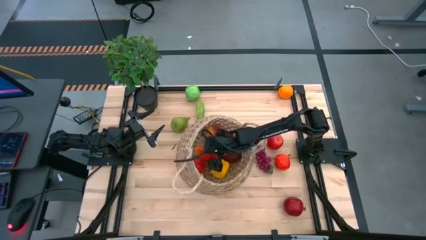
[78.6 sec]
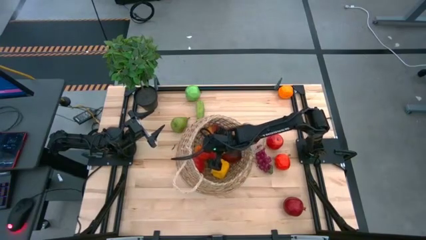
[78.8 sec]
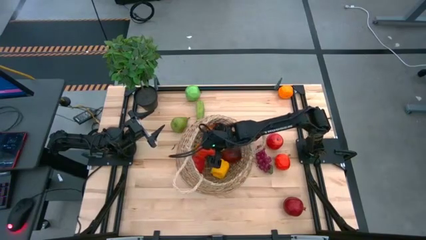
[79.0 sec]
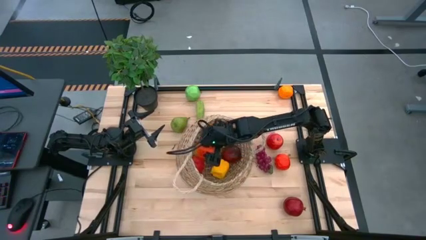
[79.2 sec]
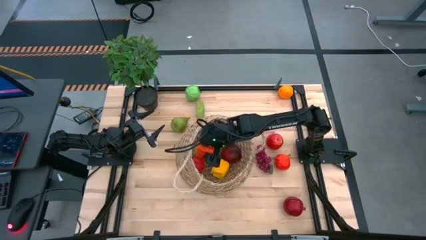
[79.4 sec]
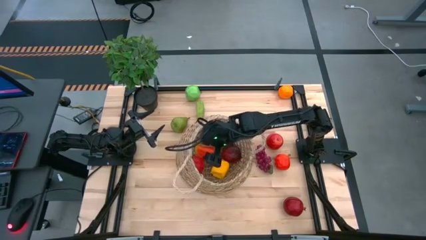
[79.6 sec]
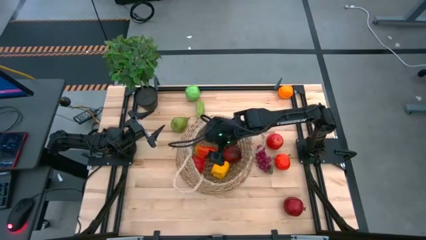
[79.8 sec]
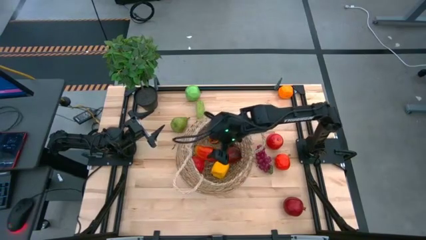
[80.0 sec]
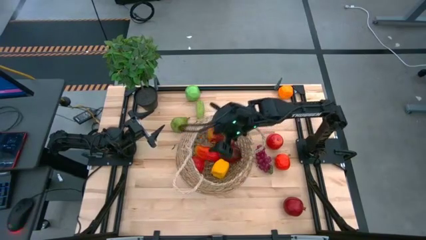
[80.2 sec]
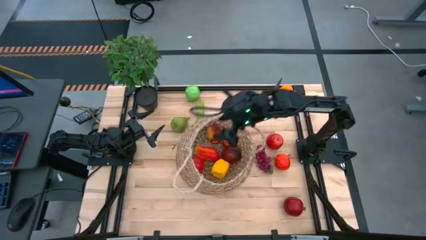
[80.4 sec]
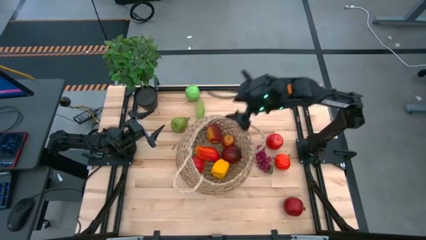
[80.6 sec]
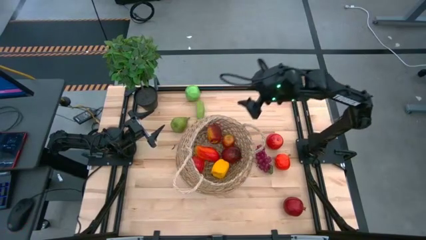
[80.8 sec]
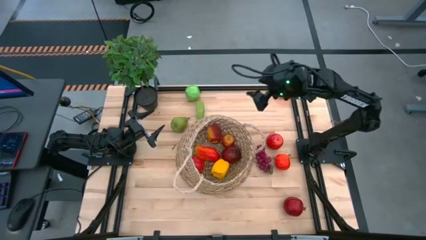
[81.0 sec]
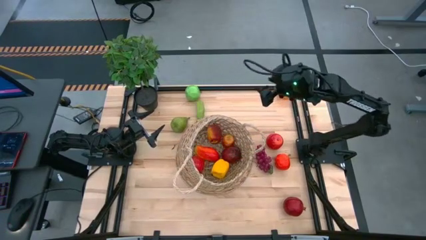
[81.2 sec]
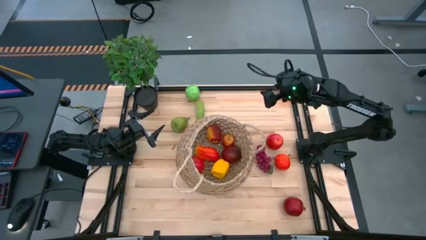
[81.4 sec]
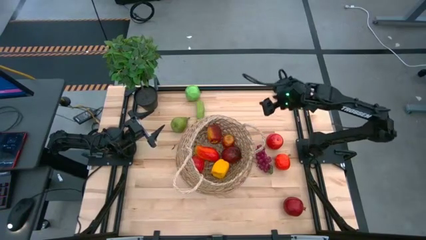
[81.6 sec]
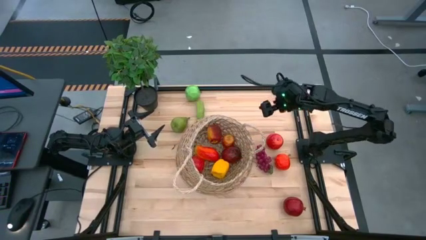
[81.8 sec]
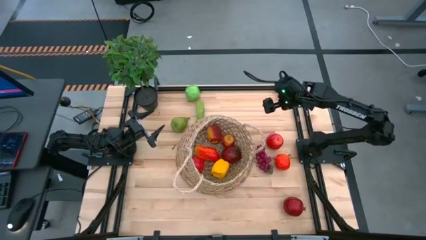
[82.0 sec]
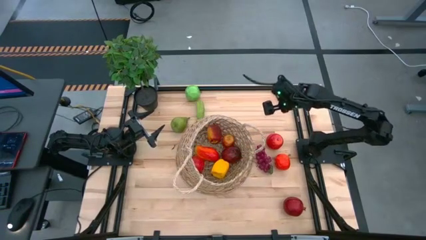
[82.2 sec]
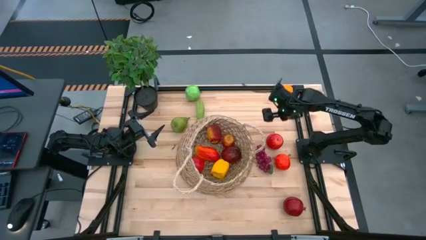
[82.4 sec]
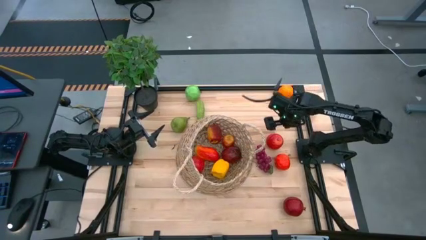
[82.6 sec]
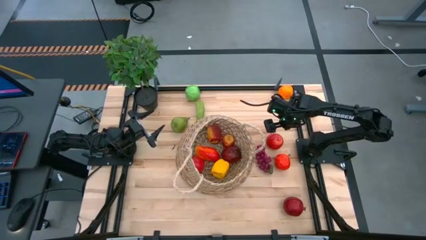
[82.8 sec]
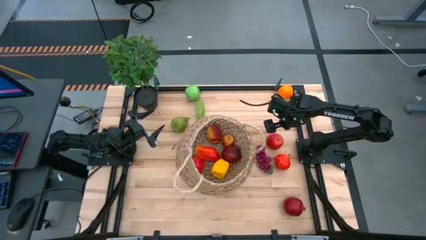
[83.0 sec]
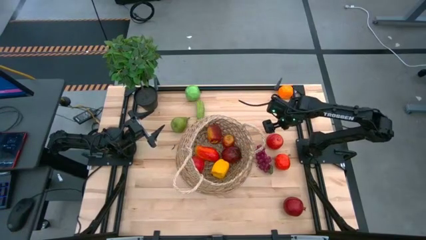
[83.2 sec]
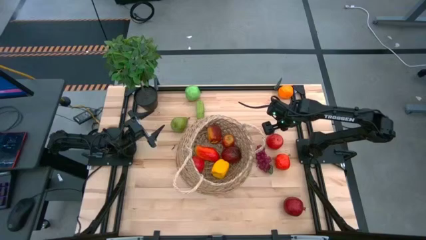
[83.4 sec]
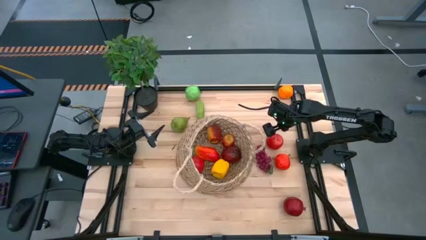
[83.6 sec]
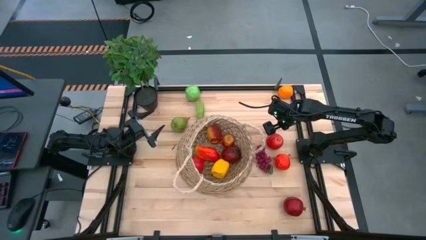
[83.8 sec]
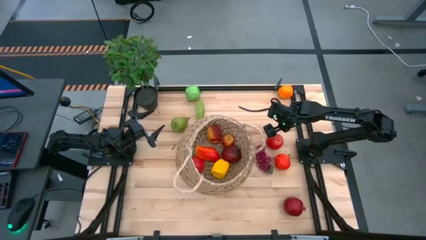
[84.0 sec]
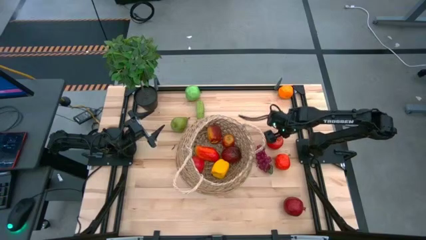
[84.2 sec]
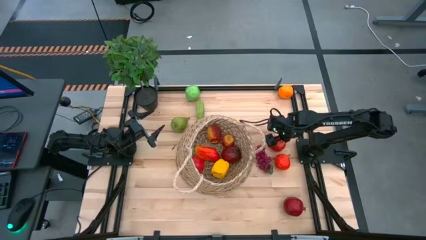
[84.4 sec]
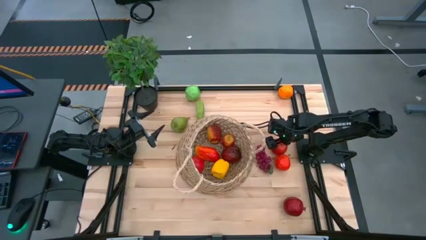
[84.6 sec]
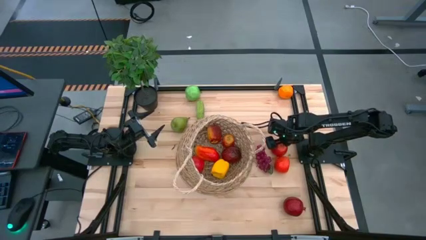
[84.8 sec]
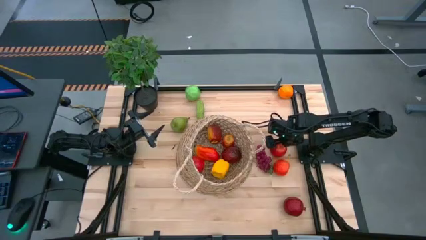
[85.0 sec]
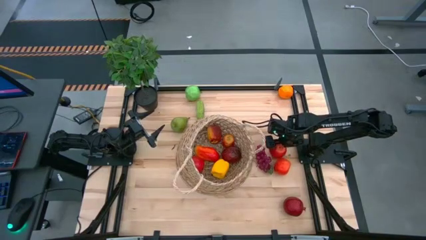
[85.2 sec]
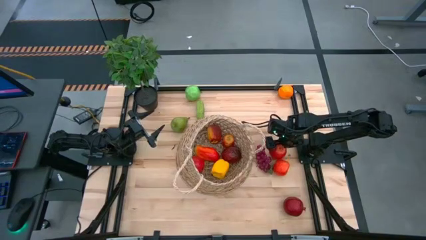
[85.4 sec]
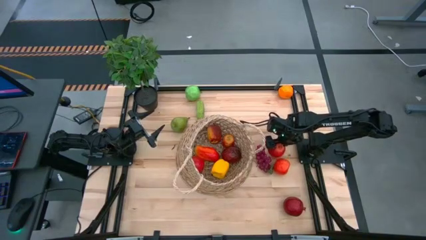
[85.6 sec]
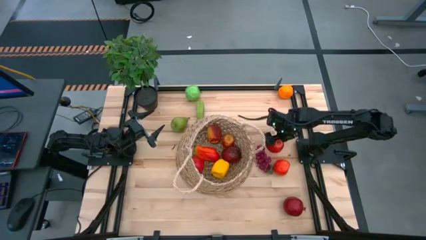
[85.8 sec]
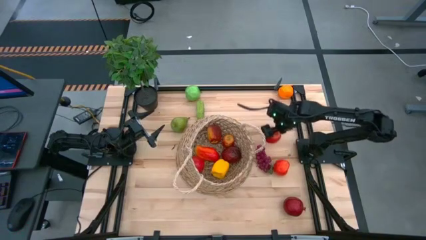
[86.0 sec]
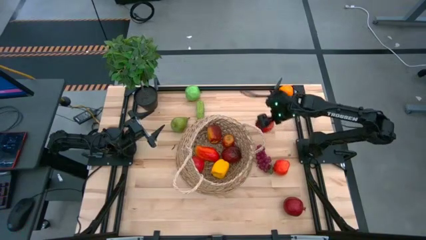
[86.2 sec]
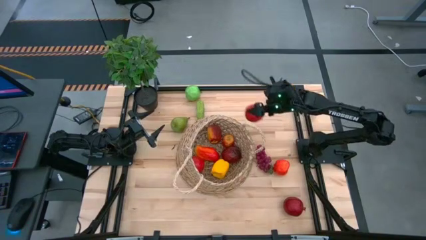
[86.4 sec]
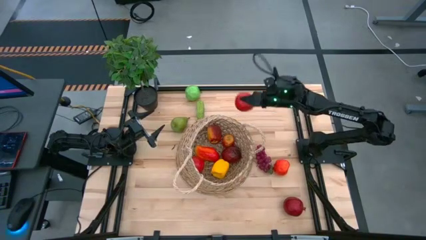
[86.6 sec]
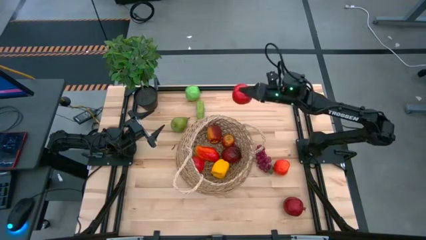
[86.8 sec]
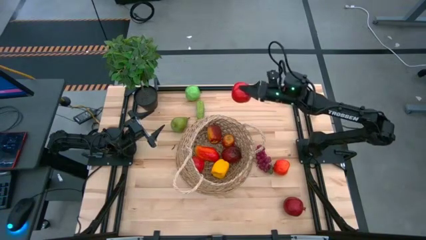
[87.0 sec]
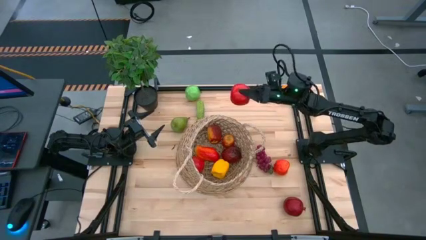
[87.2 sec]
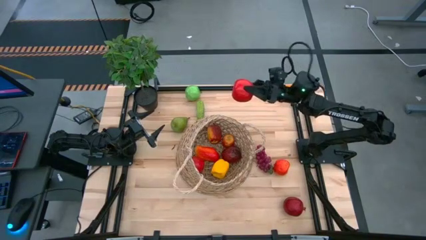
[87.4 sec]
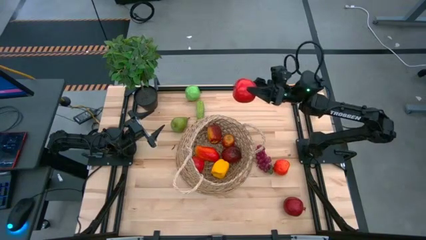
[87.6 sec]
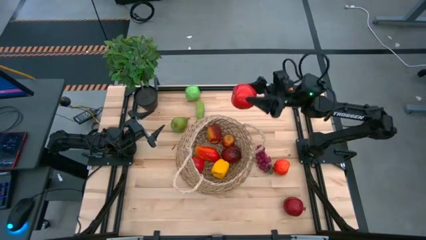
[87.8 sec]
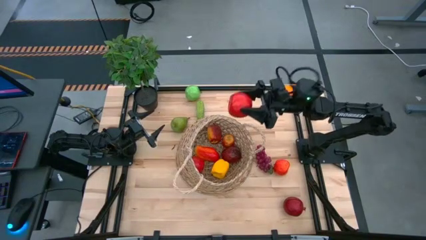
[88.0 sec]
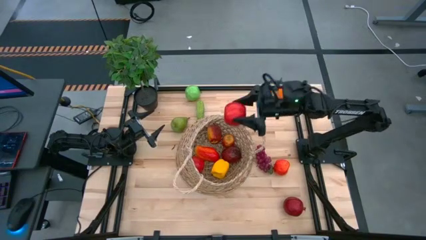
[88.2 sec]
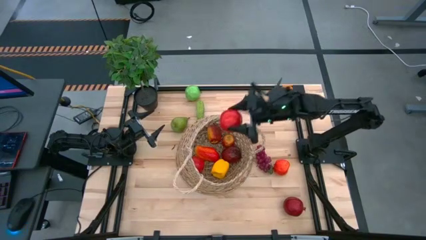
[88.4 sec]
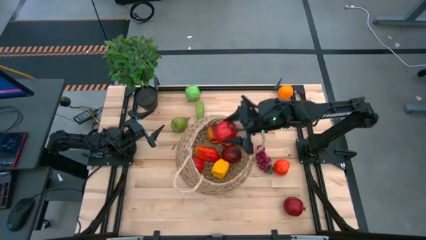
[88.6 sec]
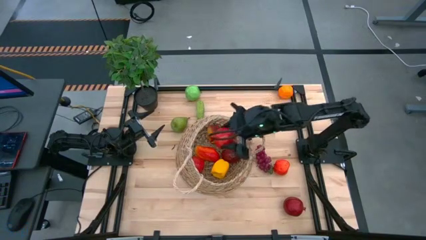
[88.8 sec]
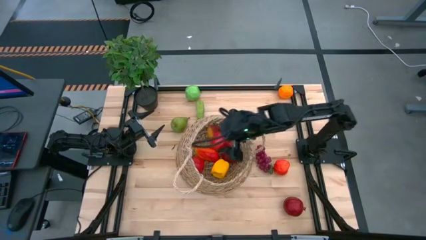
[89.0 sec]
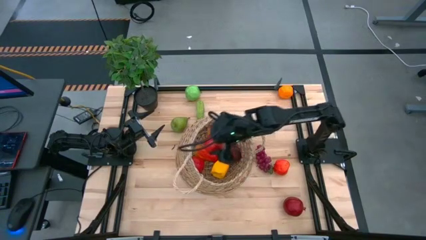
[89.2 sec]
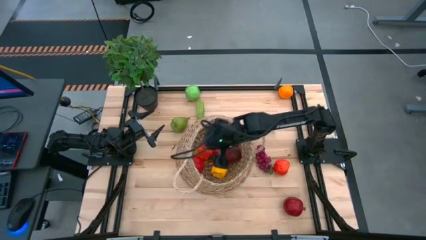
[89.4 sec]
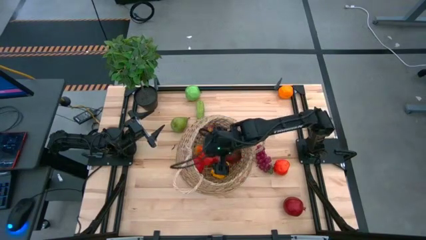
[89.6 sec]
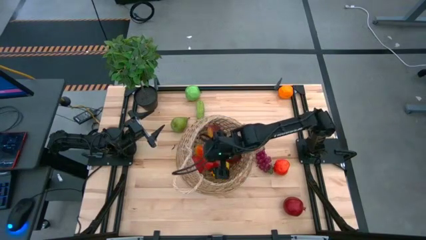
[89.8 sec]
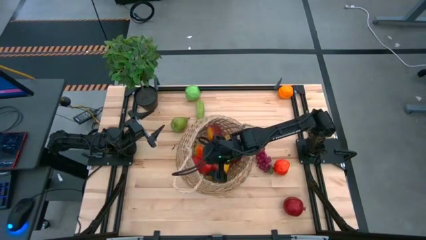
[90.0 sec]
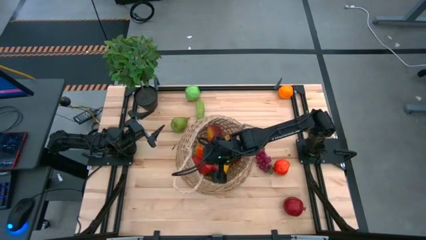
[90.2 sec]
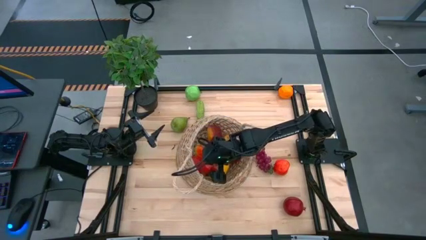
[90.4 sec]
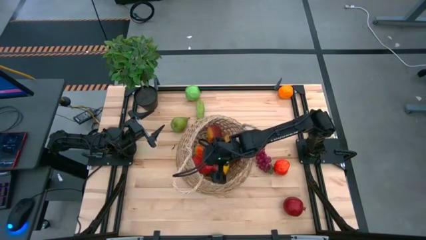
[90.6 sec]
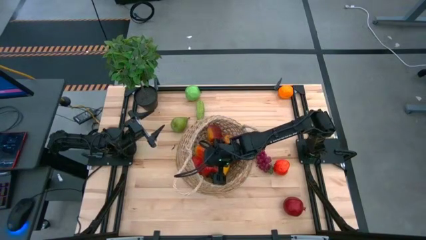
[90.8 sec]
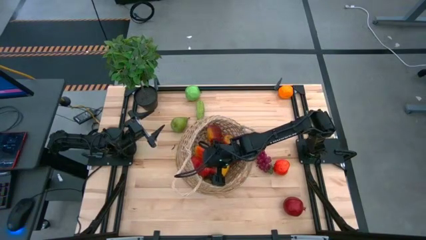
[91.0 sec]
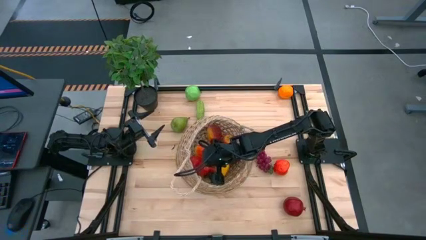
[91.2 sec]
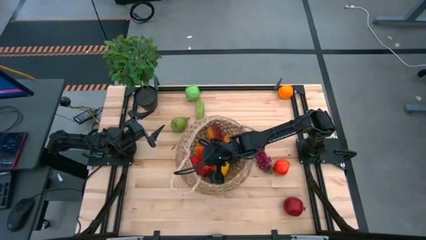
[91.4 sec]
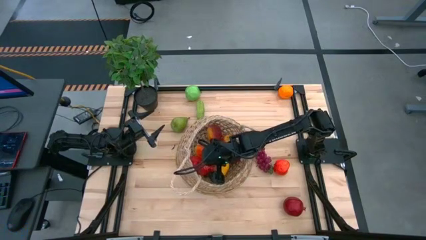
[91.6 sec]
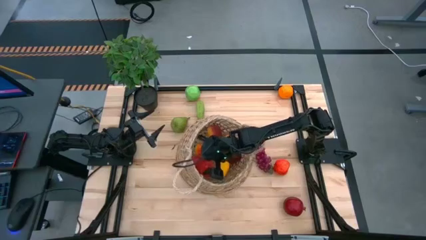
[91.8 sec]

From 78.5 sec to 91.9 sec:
Task: Build produce basket
Put the top red apple into the woven basket

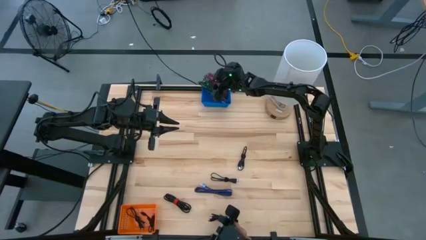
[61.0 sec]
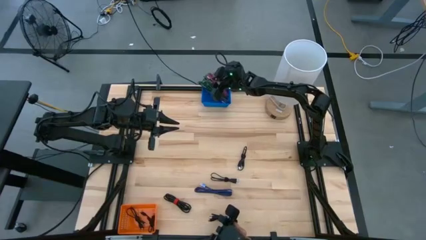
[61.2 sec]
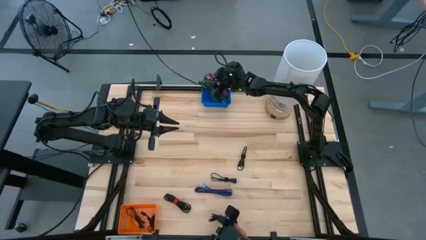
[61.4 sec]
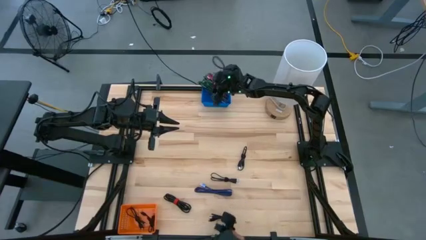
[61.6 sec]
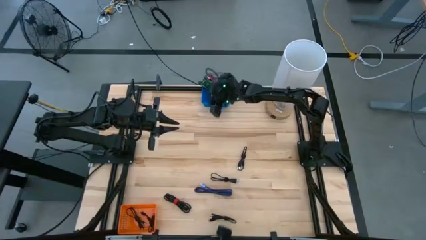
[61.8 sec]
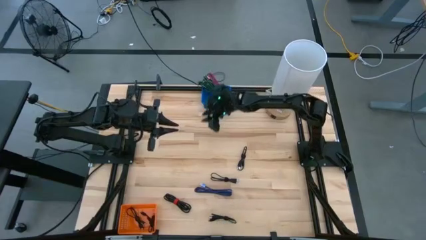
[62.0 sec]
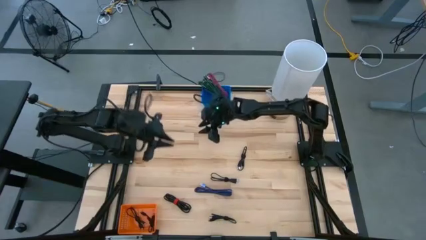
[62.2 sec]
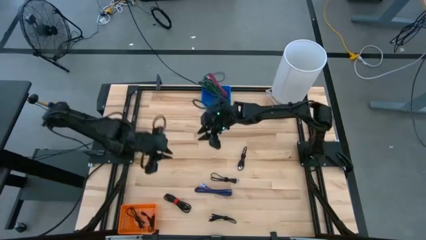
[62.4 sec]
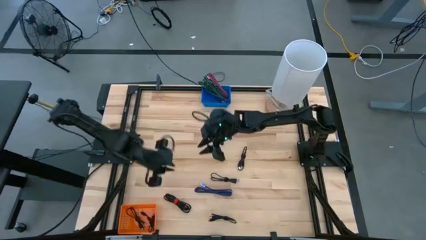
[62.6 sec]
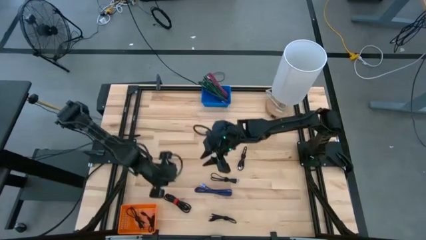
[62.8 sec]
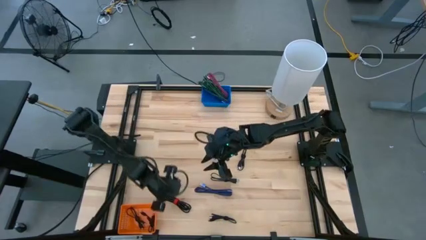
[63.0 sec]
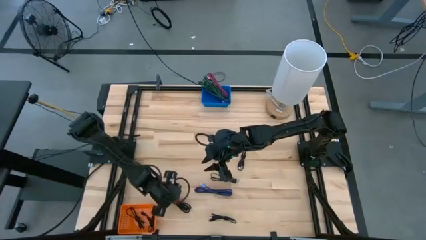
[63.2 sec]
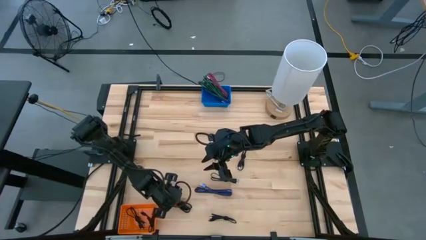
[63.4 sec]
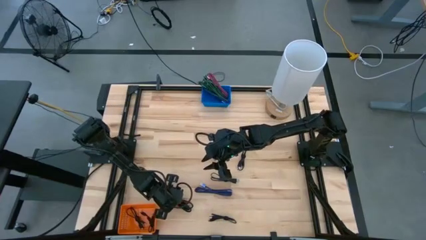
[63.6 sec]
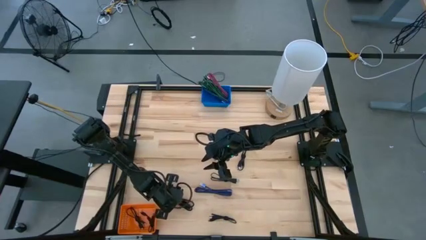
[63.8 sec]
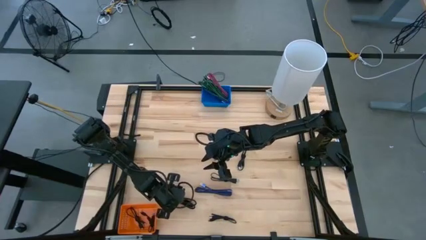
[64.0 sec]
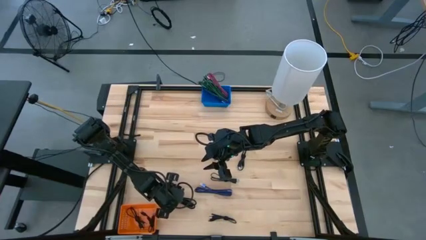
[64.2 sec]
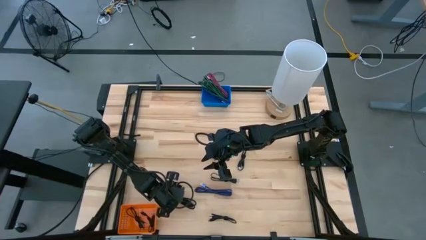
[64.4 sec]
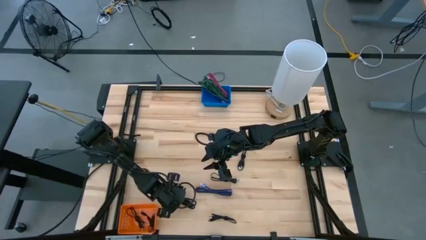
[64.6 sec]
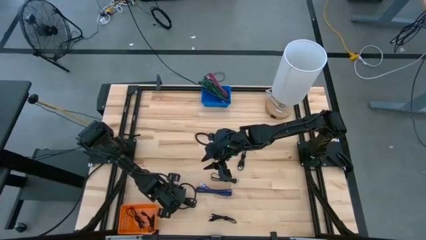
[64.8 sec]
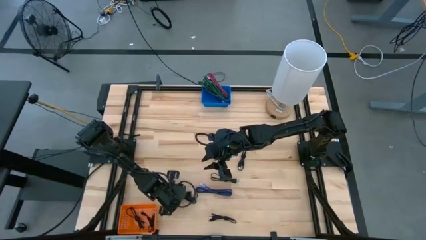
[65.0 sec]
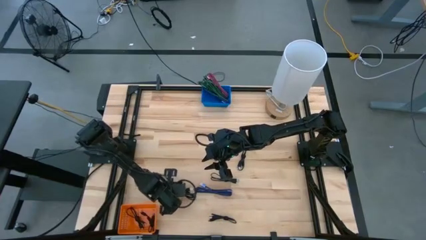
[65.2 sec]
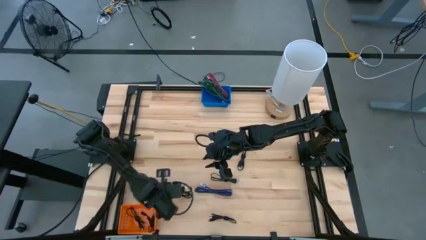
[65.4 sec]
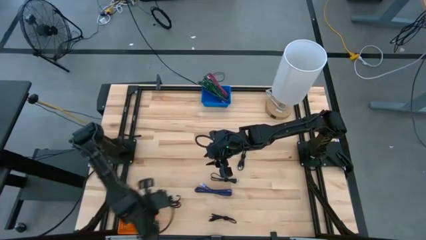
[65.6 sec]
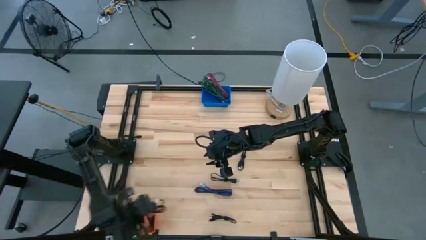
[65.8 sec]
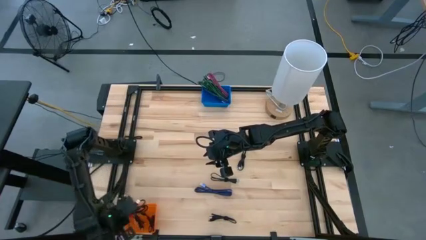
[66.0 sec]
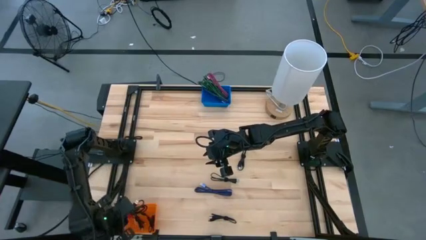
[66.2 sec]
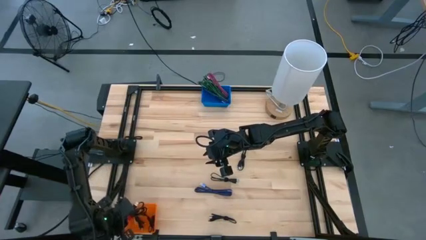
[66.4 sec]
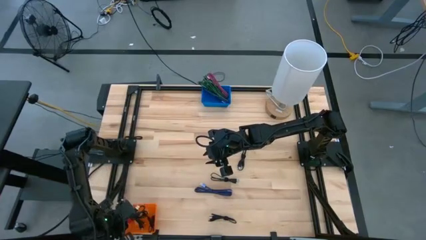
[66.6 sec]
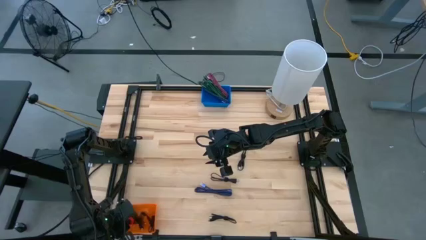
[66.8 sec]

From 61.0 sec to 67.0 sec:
Task: Pick & Place USB Port
Put the black charger cable into the orange basket
